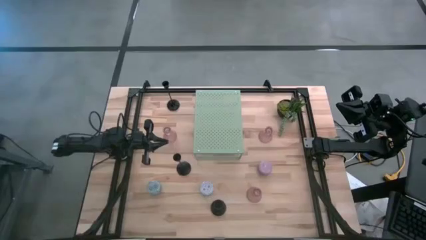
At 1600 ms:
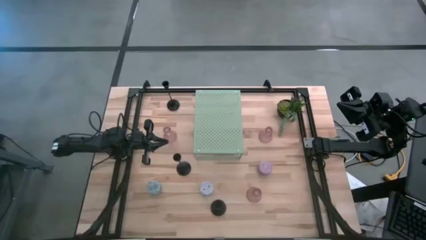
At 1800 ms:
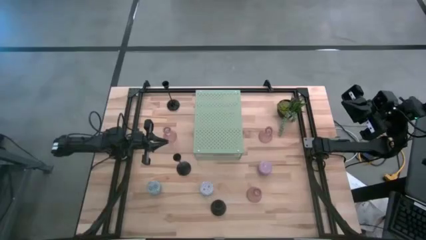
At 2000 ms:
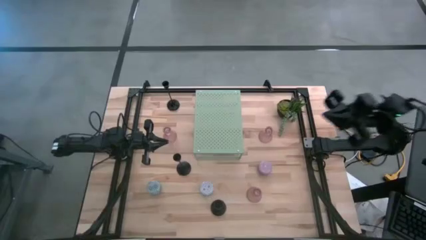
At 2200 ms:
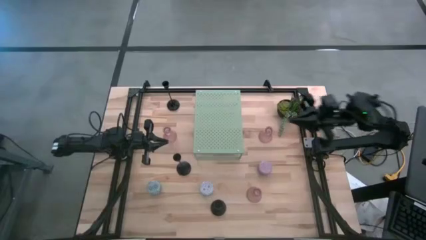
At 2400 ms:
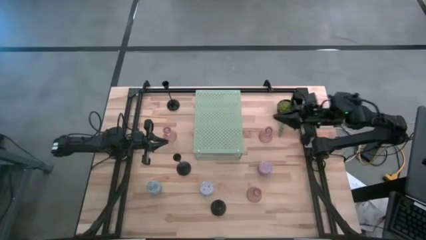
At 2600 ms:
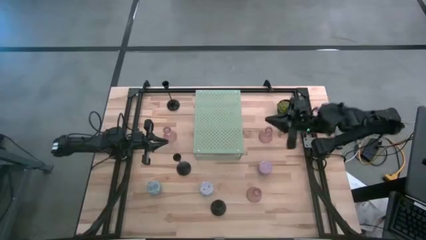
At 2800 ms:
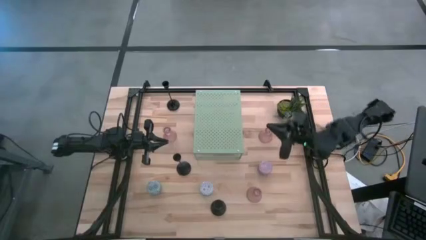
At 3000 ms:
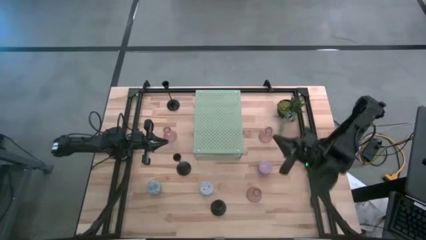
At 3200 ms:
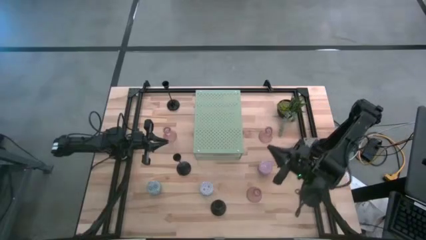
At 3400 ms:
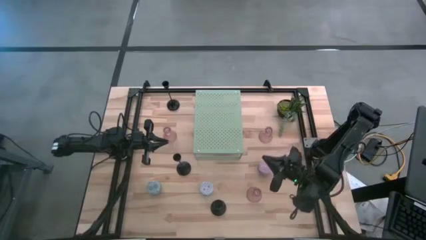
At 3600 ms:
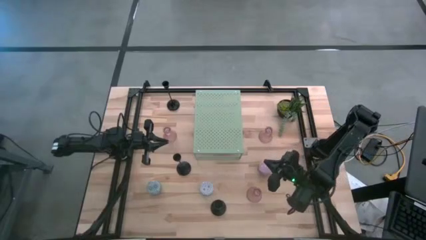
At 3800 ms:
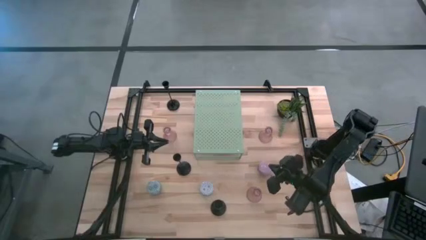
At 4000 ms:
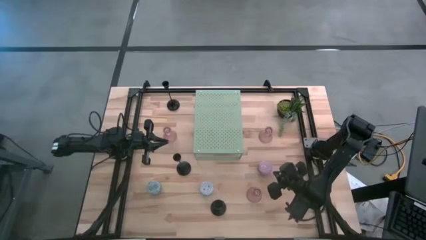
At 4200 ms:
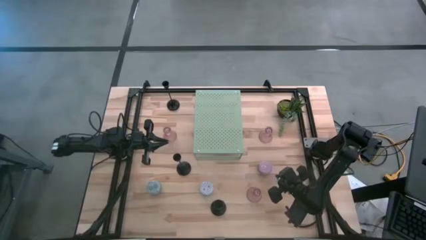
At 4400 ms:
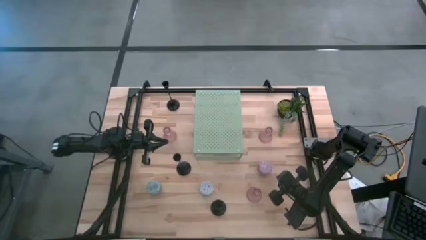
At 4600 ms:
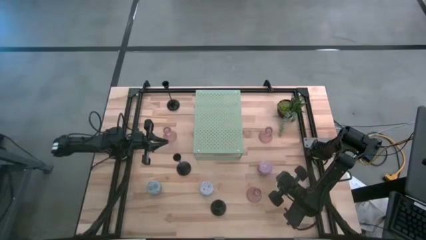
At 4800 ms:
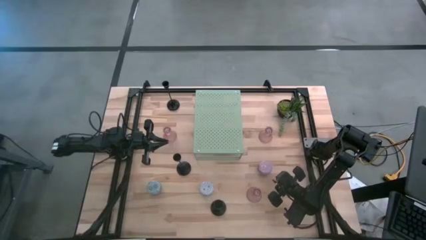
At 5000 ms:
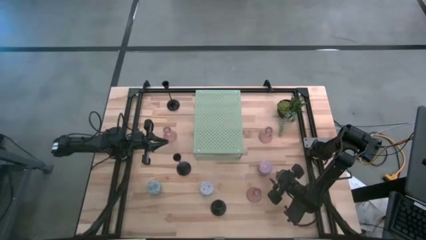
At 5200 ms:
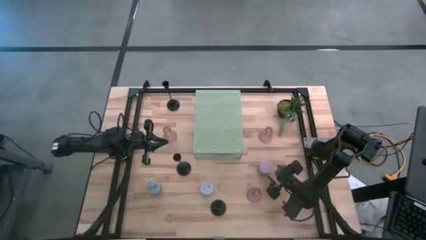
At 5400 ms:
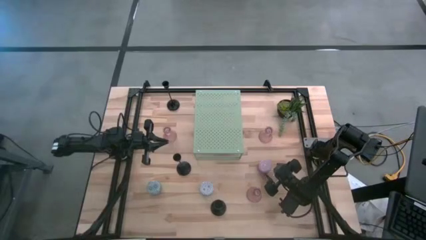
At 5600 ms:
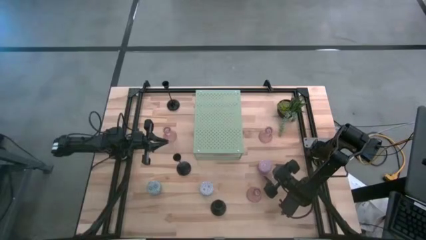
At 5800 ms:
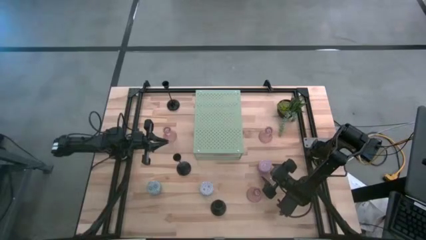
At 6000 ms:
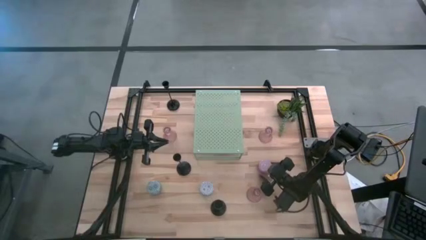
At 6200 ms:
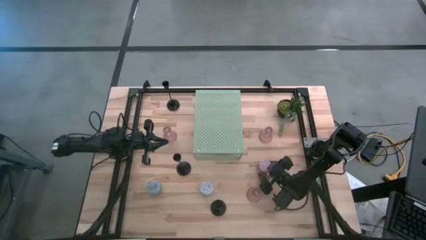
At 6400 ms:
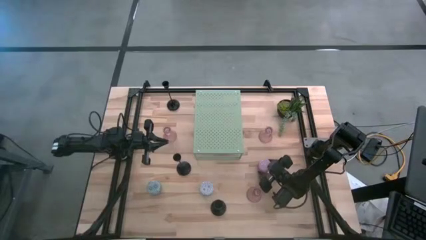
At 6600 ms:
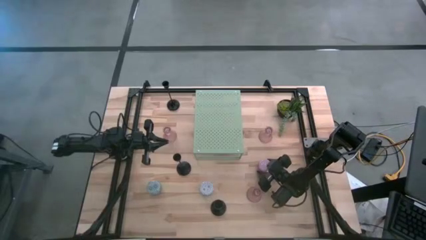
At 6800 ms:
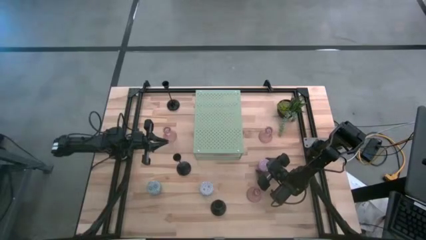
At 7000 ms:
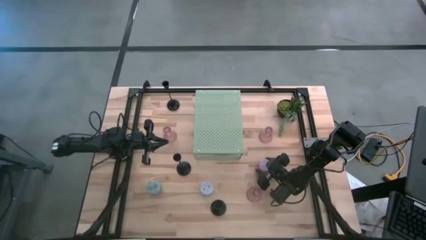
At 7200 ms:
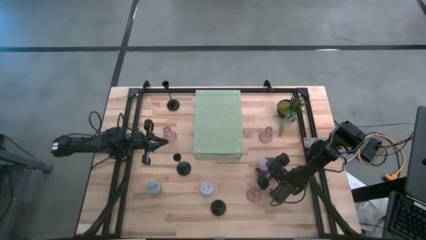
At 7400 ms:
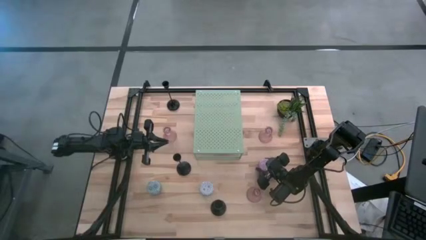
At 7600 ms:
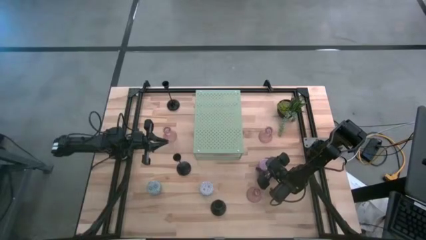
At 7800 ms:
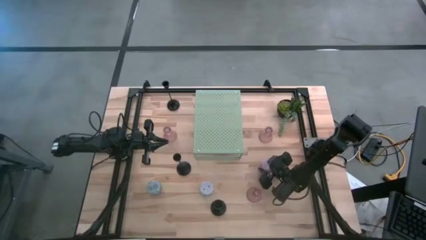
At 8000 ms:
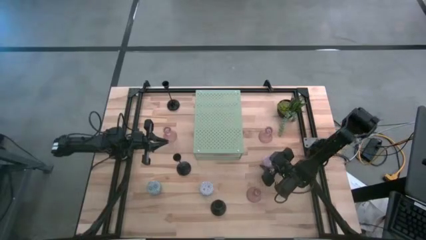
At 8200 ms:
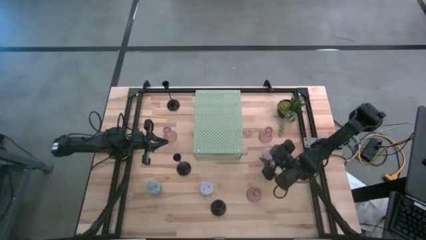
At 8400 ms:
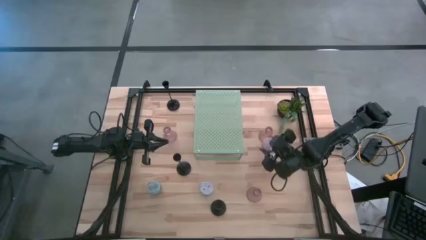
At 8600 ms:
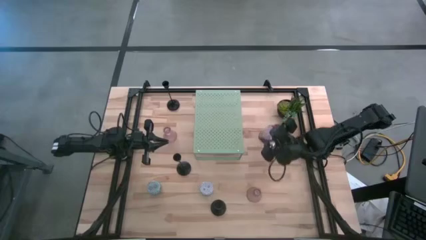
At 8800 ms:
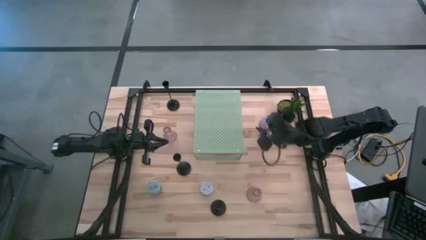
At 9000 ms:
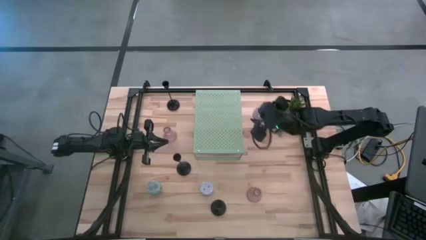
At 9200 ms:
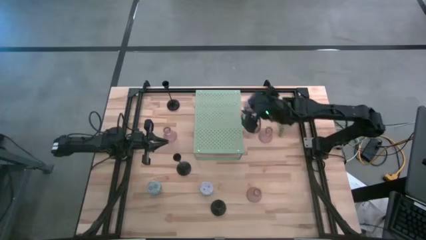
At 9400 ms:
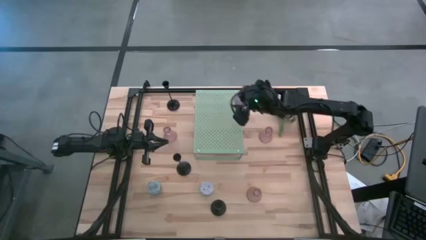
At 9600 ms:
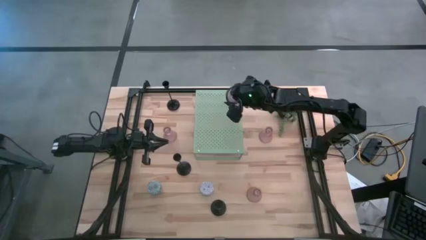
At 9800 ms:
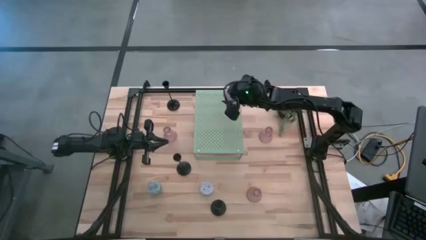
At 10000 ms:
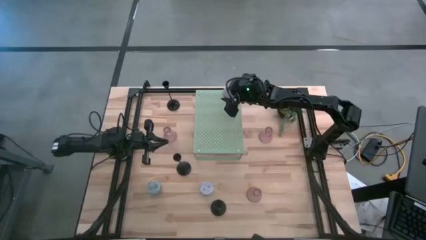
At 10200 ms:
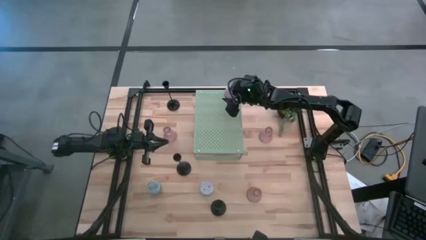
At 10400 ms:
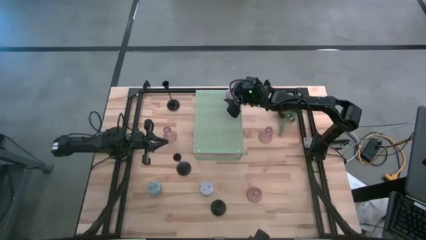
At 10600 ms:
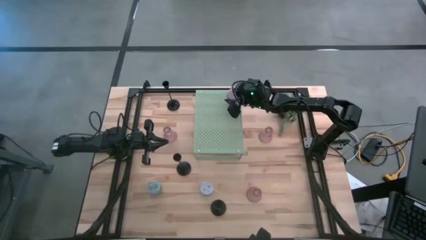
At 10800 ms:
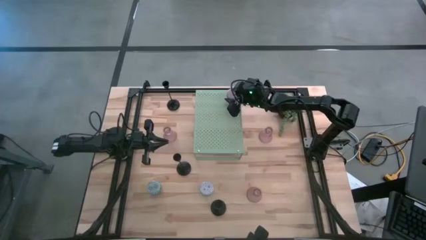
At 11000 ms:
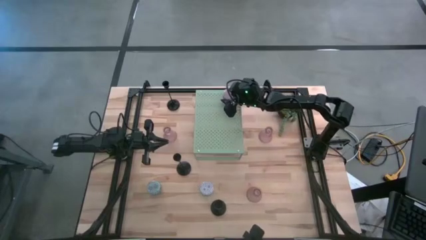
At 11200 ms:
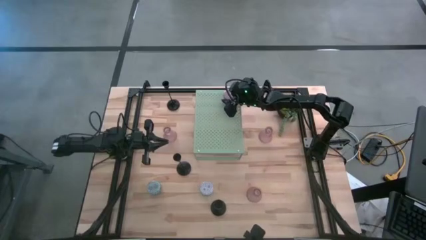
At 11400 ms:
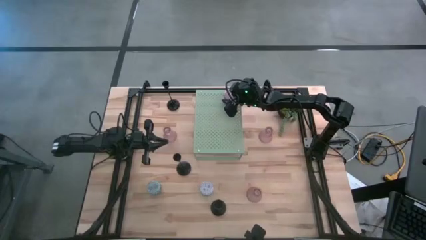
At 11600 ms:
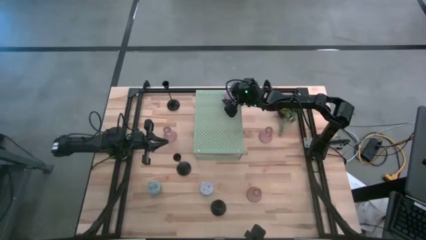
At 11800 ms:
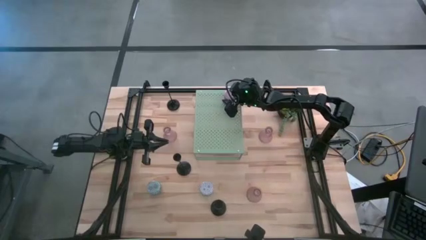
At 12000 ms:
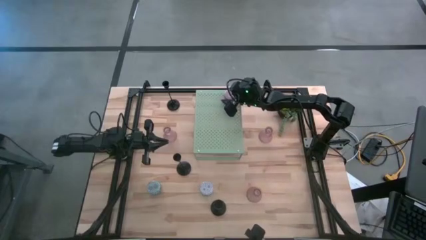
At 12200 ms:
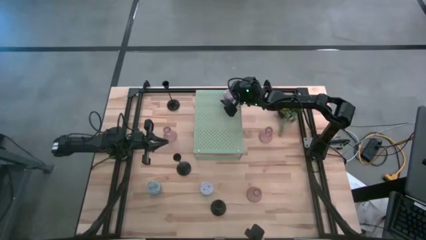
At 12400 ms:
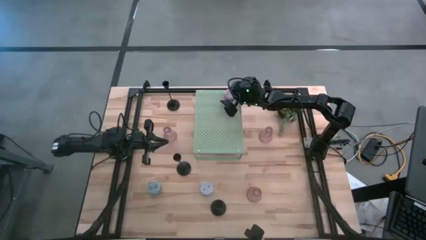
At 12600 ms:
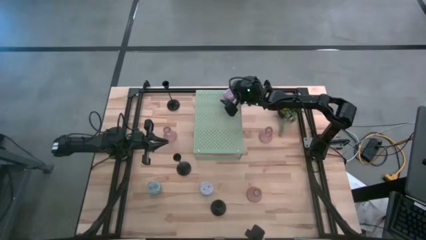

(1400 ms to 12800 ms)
Task: Pick & Place candle stick holders
Put the right candle on the shelf
